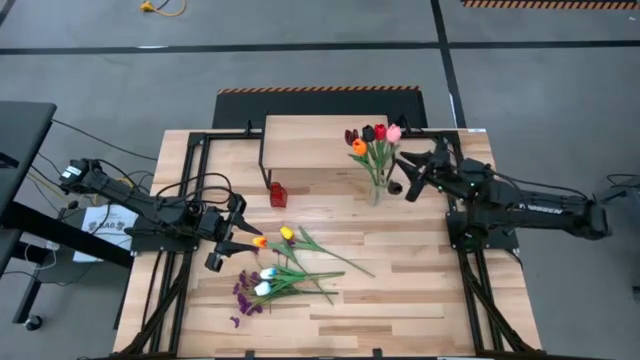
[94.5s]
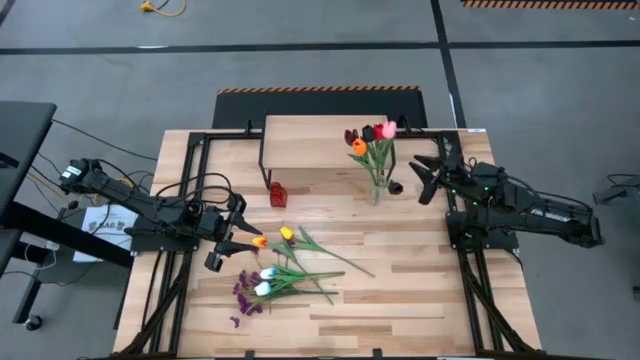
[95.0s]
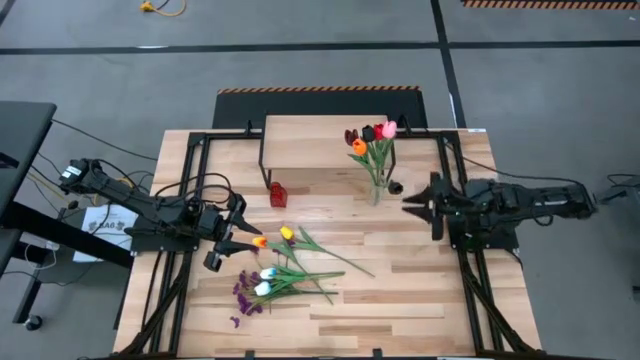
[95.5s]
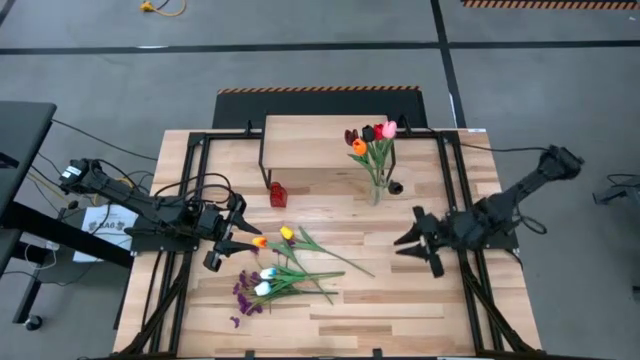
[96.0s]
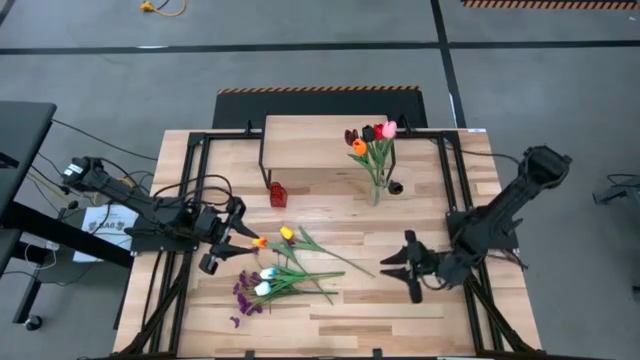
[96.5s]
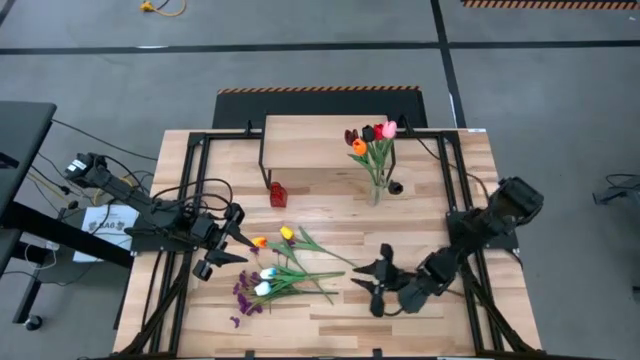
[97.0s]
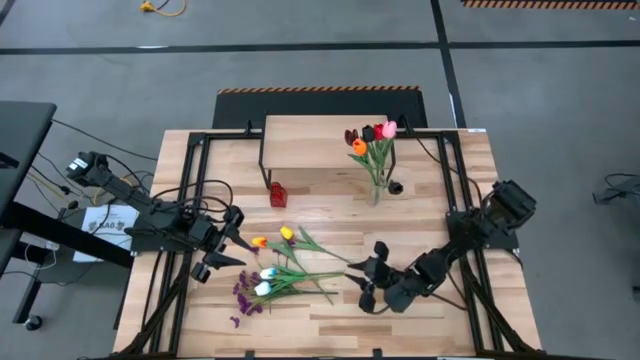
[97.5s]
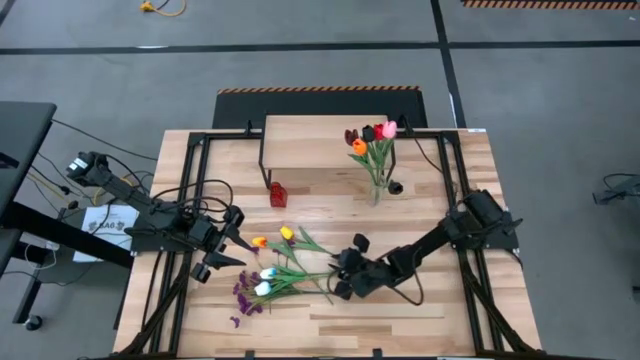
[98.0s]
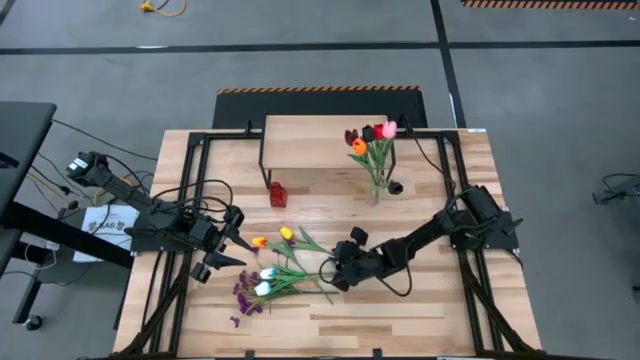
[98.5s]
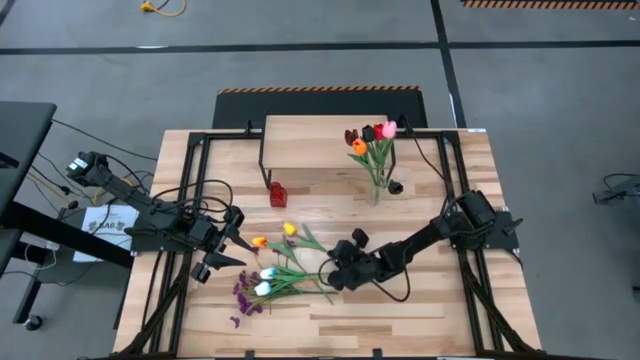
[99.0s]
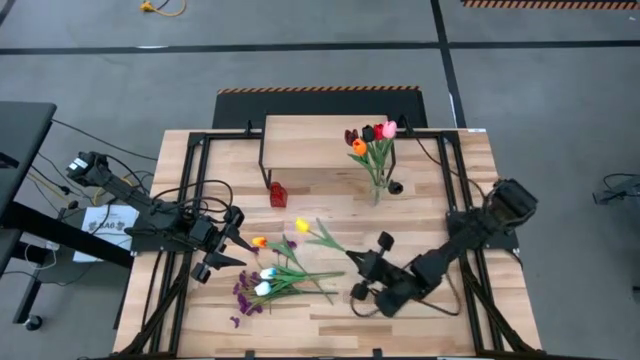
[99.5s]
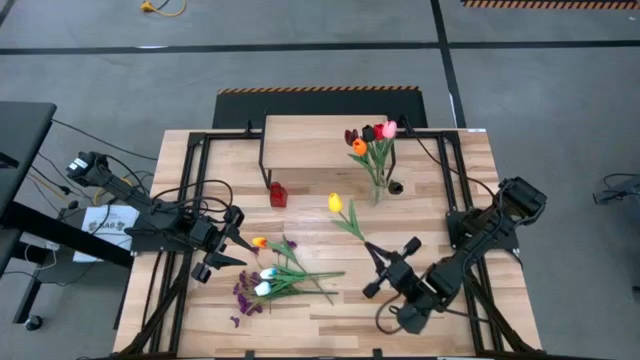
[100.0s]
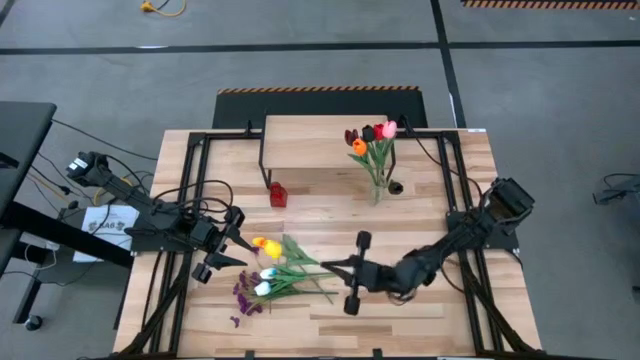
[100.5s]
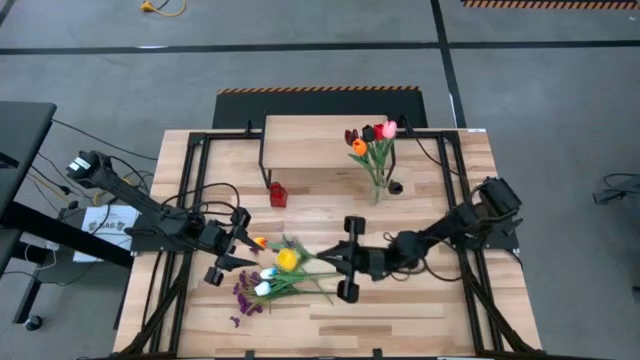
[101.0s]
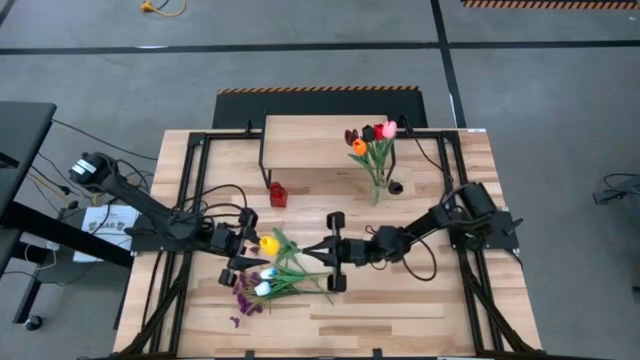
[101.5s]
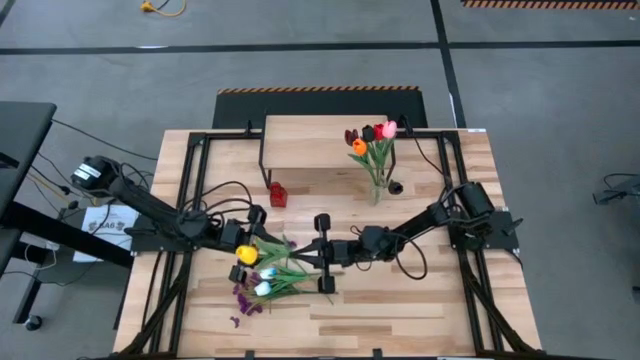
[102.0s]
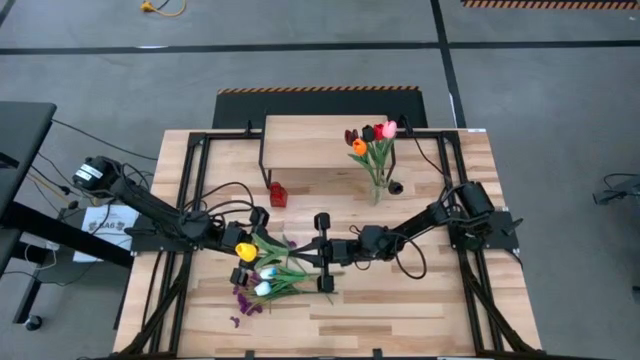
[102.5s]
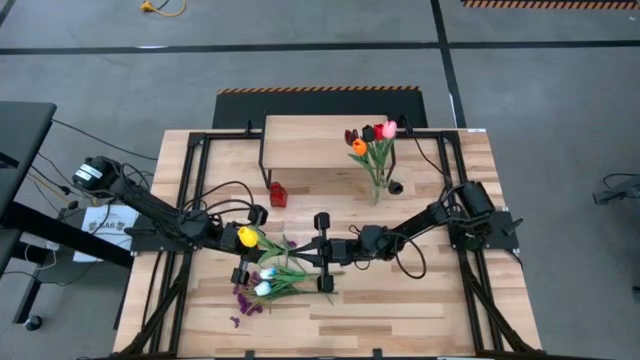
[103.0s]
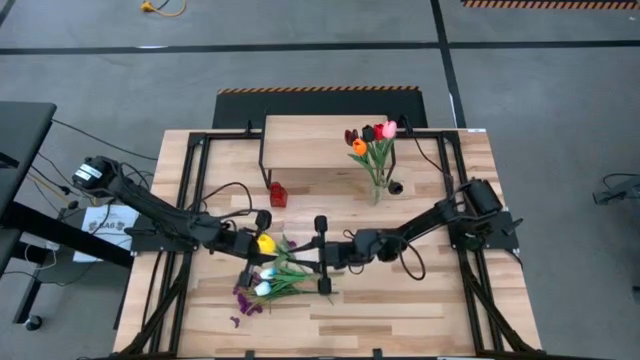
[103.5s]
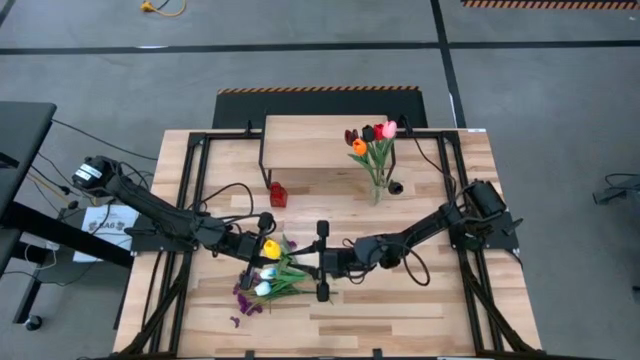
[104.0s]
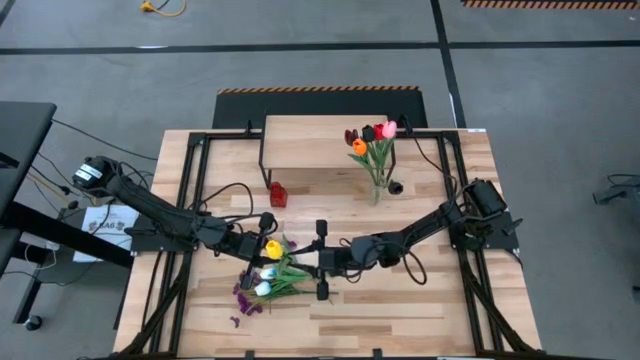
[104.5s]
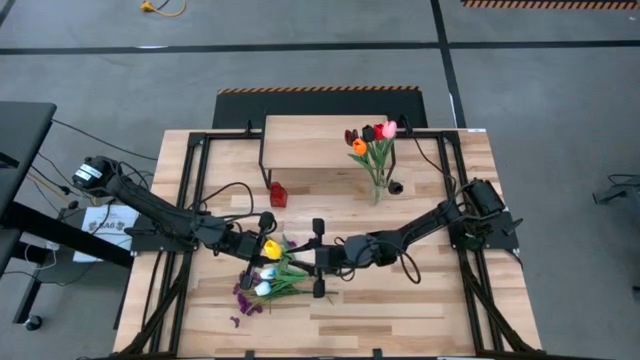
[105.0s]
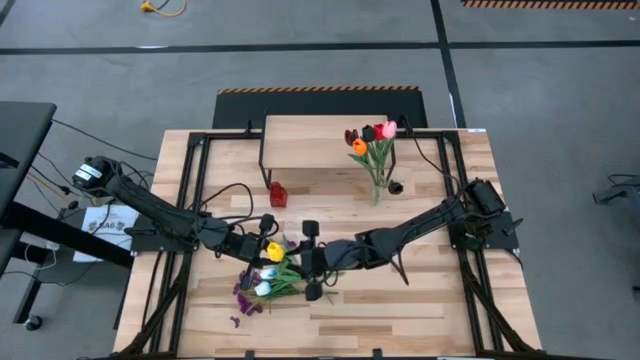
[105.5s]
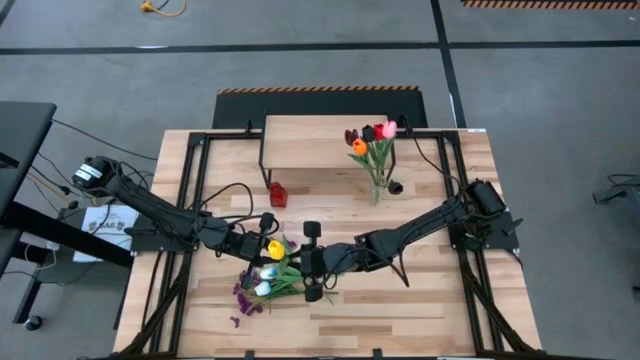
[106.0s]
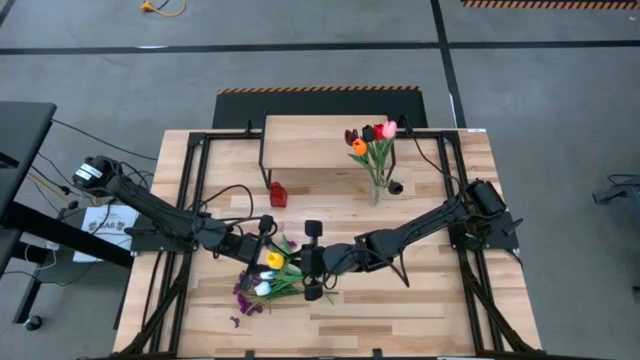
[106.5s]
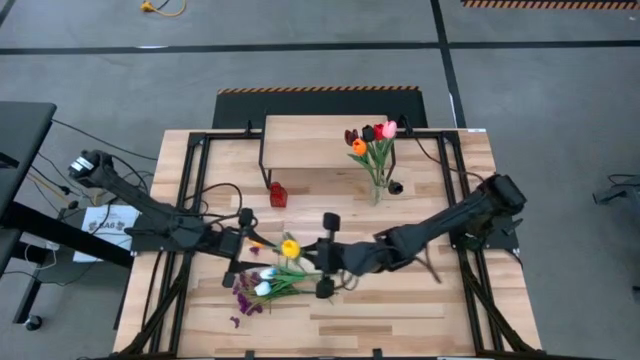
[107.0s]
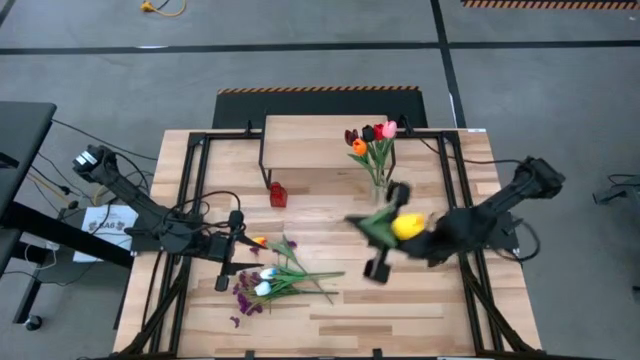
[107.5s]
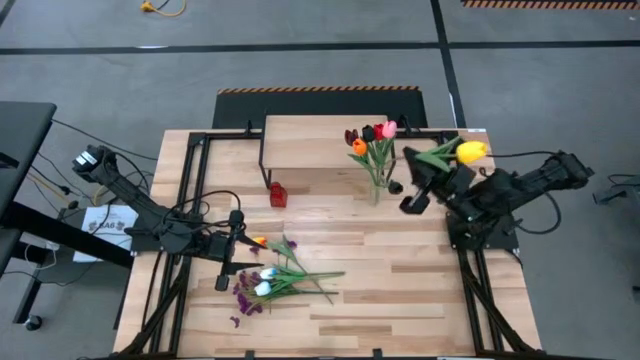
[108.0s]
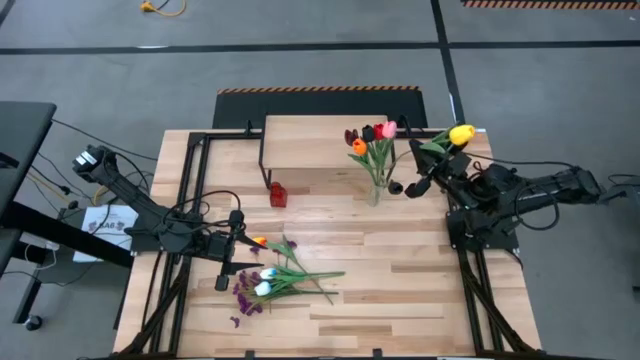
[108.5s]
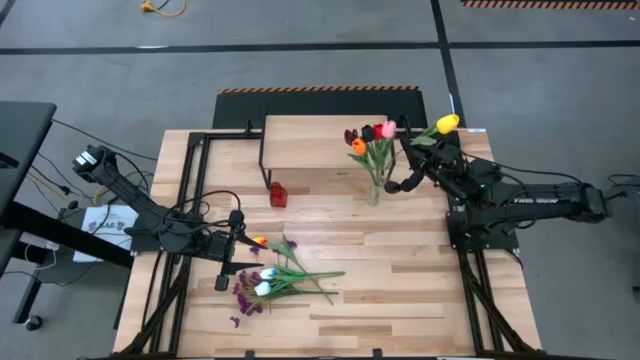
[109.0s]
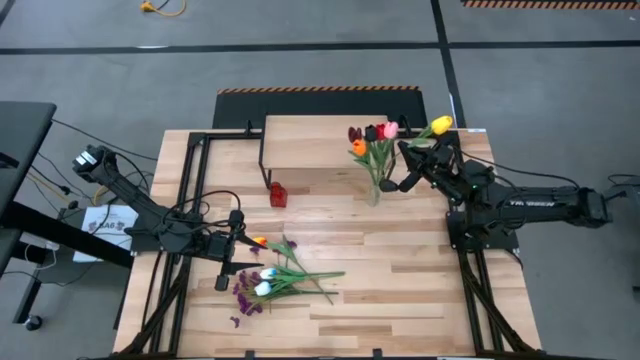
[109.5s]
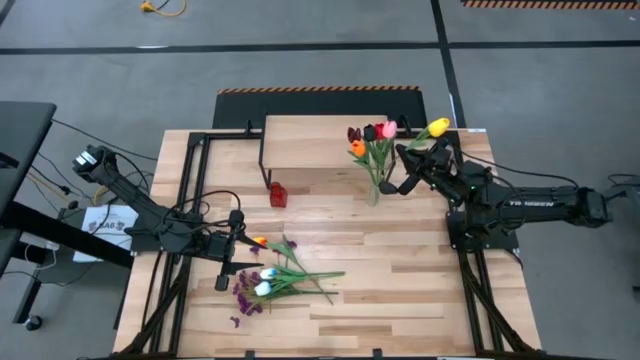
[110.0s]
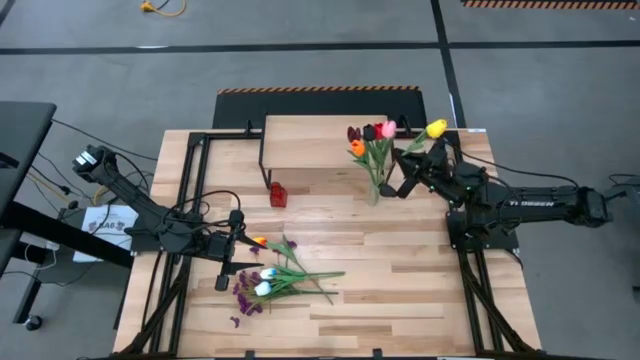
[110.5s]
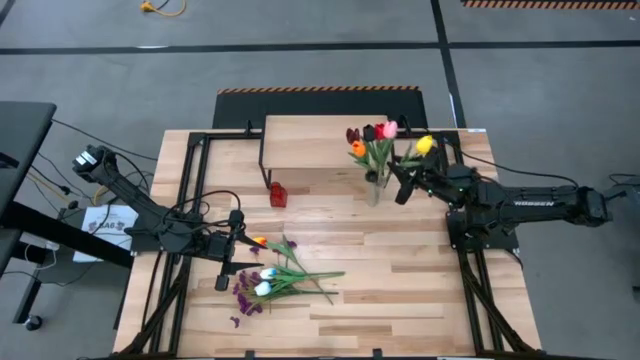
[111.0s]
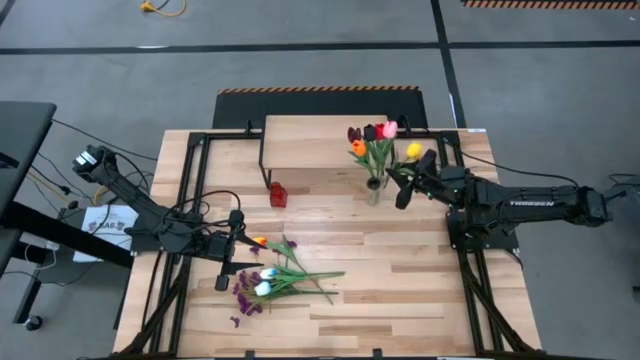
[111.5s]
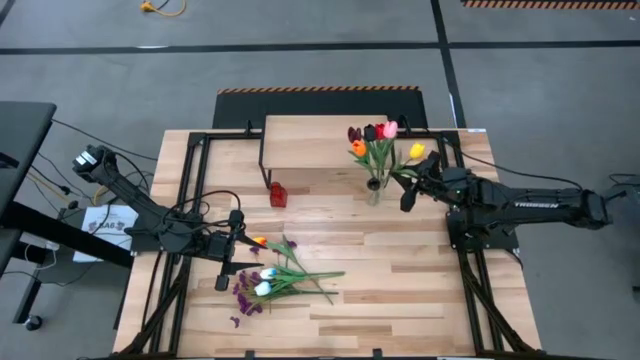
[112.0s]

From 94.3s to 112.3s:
Task: Pick and place flowers into a vace then onto a shelf
Put the yellow flower into the transparent vase

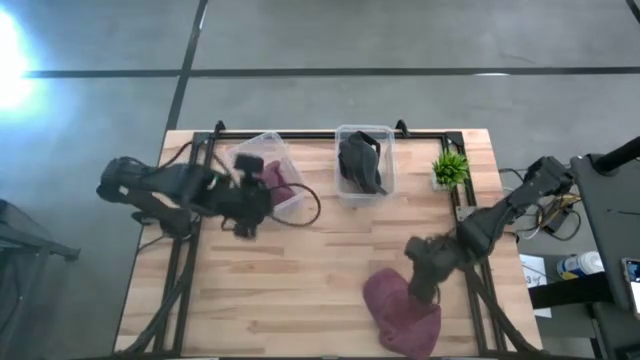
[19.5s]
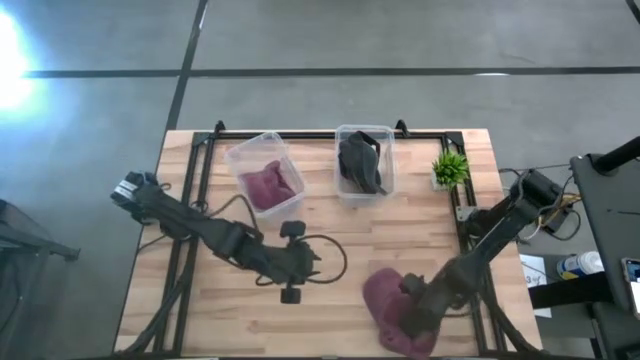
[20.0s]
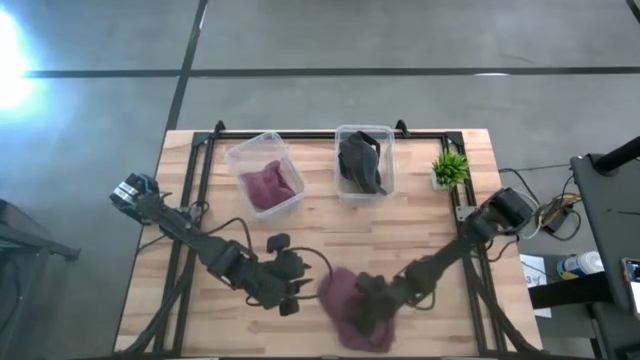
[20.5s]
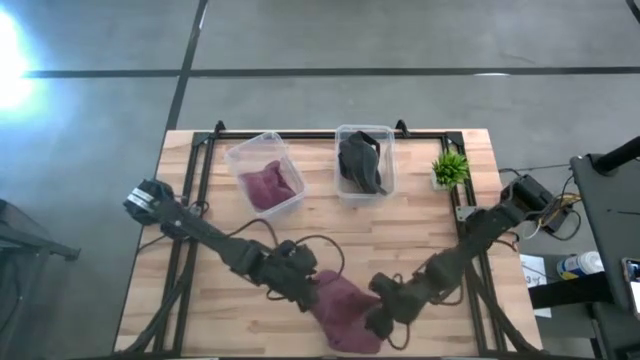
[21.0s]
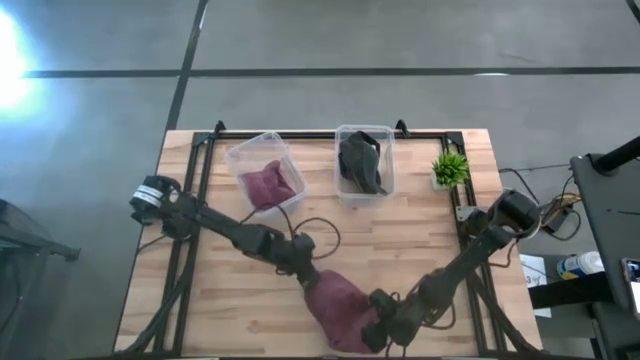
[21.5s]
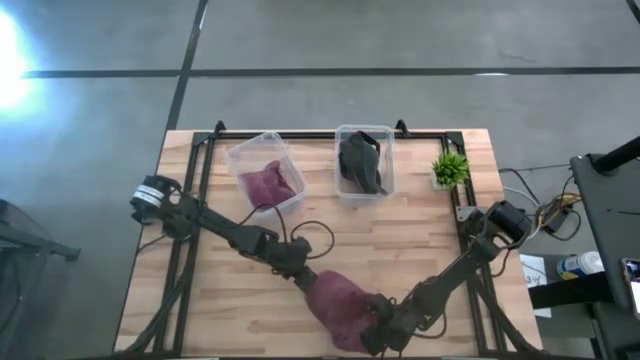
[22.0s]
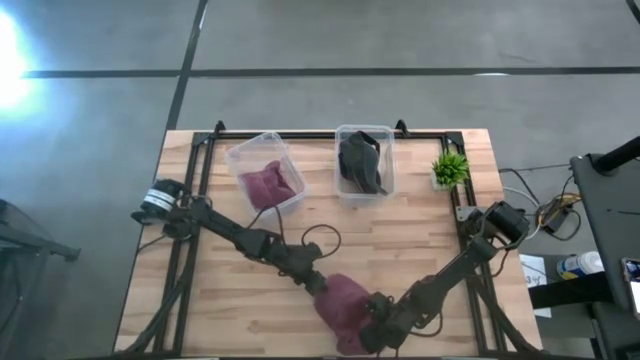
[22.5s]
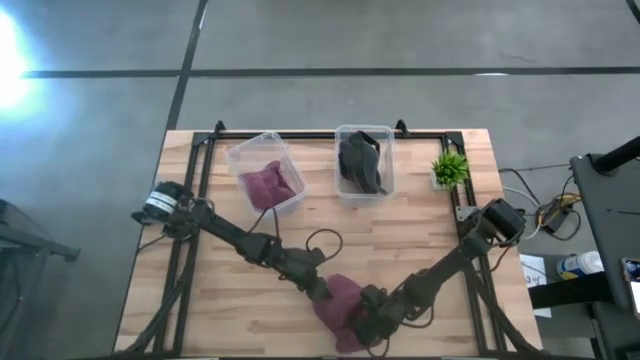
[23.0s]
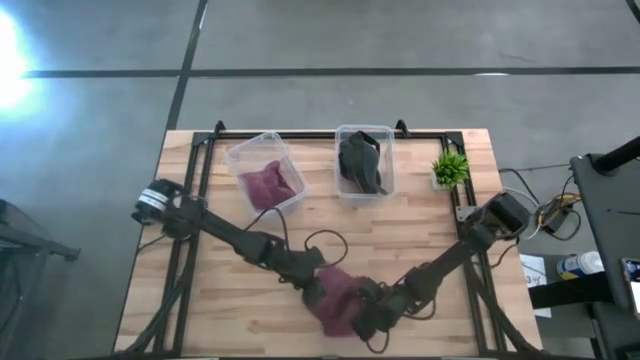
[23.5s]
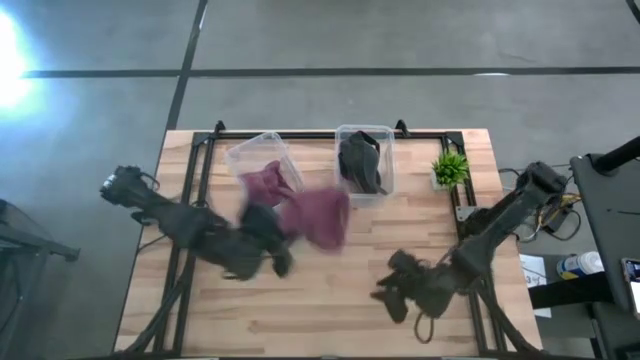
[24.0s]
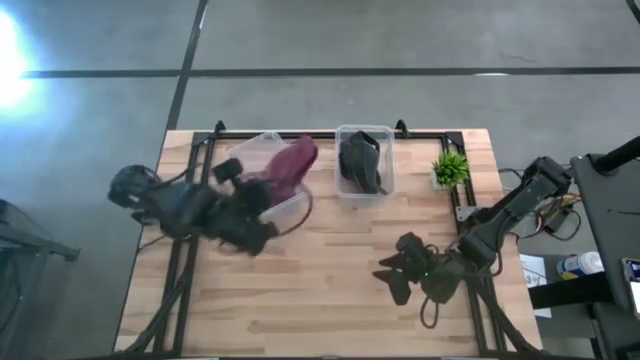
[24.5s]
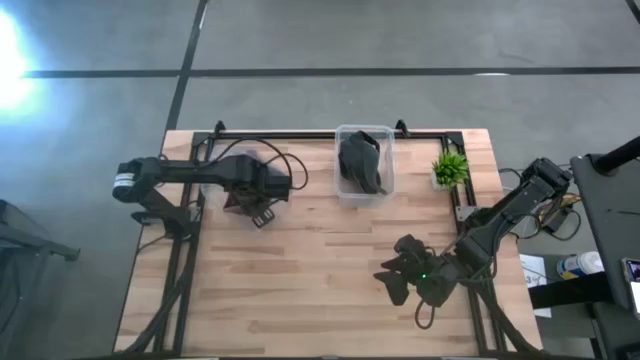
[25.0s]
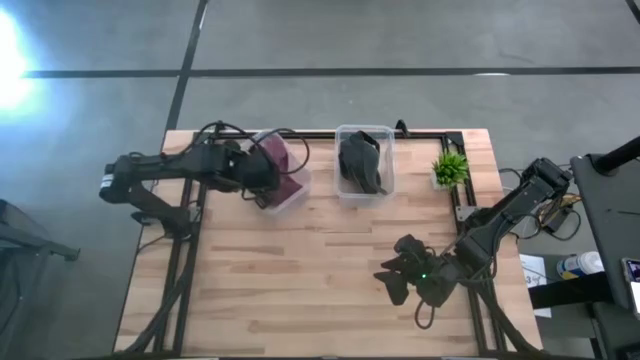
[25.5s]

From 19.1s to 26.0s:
Task: Pick & Place hat
Put the red cap into the left transparent bin
